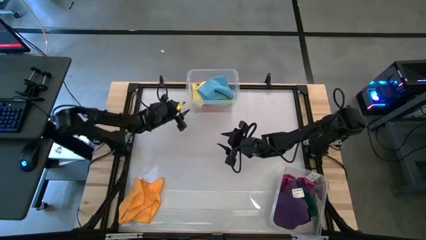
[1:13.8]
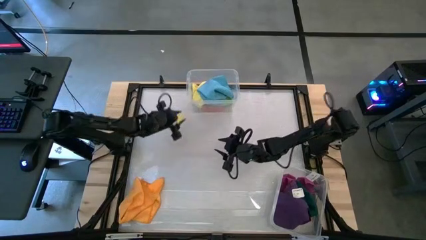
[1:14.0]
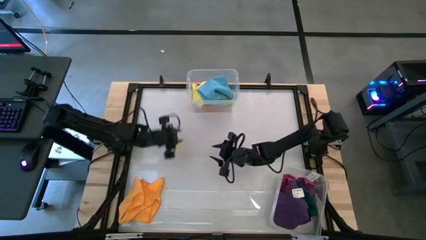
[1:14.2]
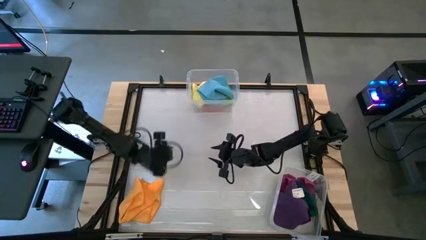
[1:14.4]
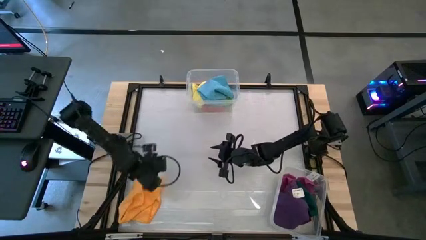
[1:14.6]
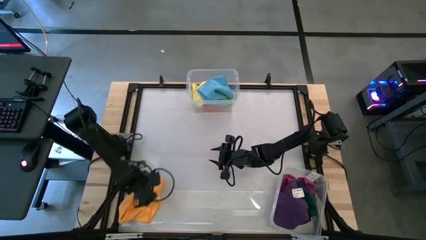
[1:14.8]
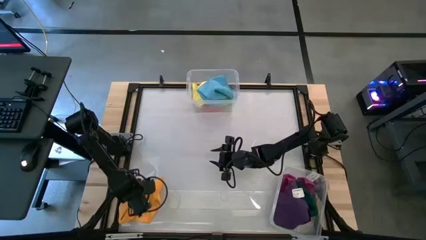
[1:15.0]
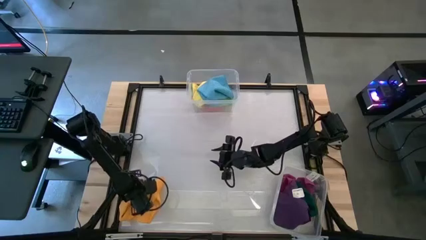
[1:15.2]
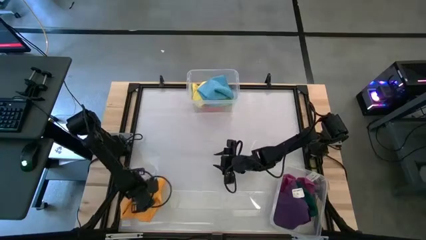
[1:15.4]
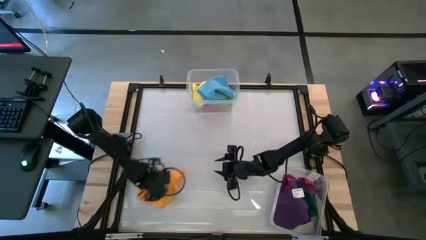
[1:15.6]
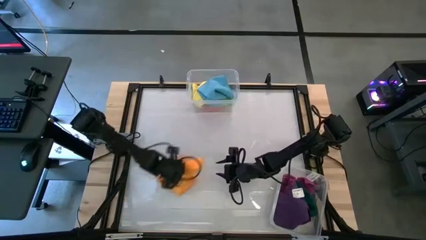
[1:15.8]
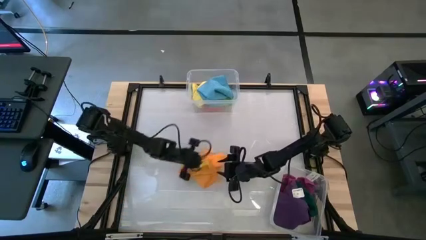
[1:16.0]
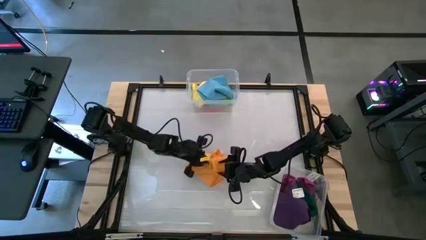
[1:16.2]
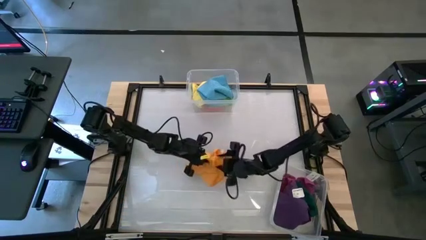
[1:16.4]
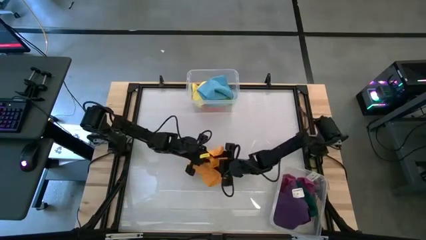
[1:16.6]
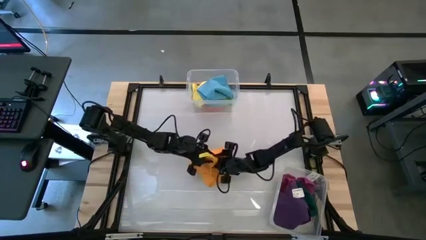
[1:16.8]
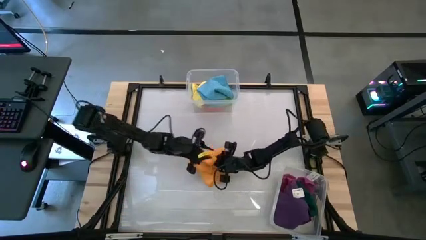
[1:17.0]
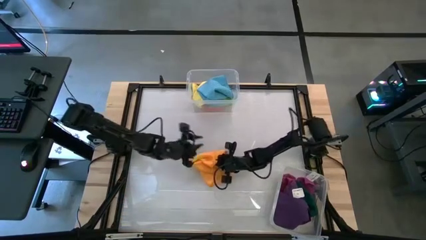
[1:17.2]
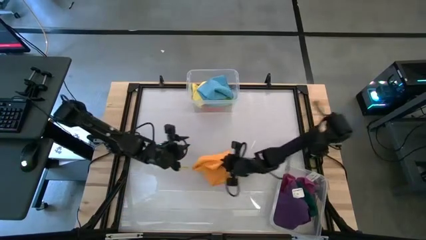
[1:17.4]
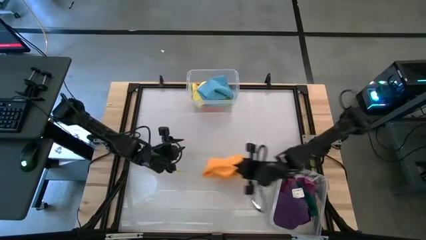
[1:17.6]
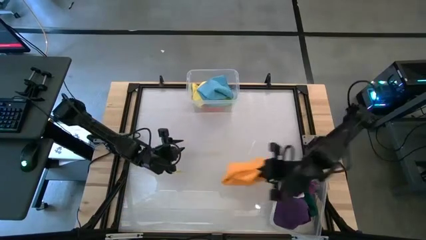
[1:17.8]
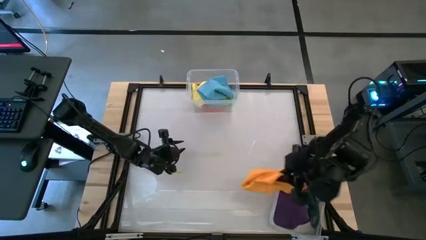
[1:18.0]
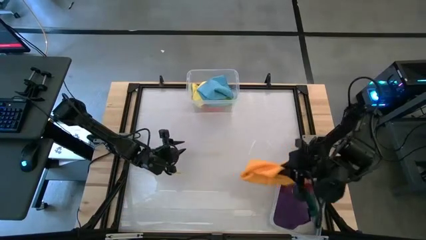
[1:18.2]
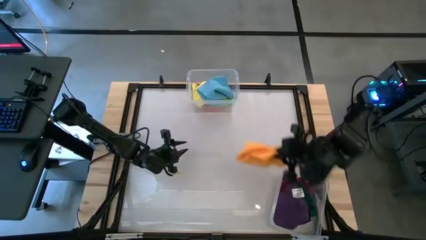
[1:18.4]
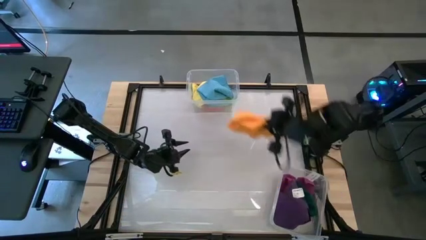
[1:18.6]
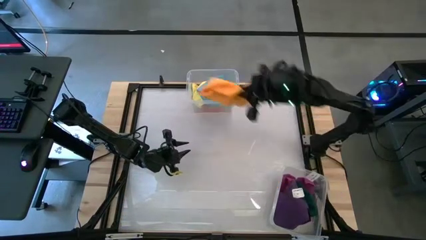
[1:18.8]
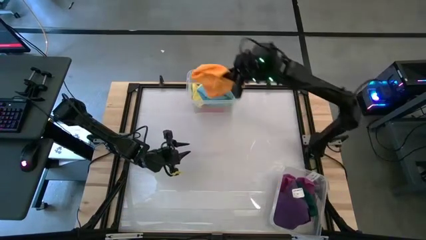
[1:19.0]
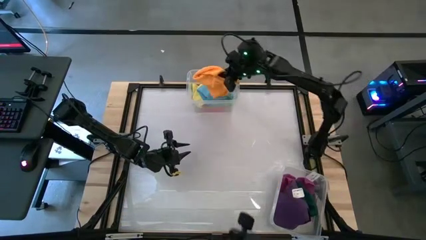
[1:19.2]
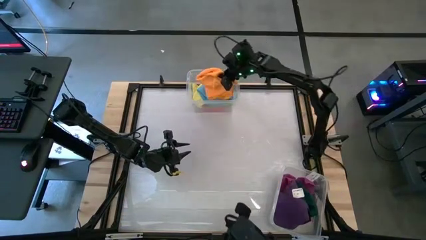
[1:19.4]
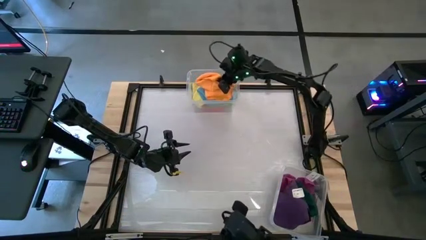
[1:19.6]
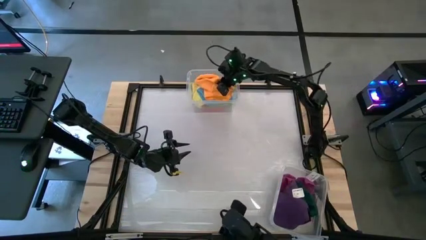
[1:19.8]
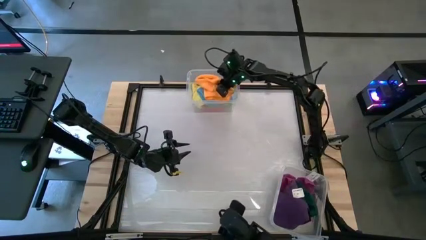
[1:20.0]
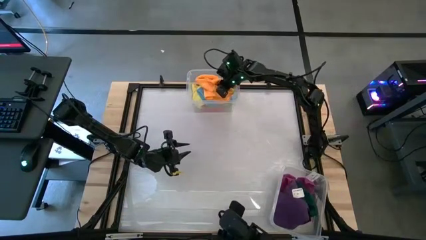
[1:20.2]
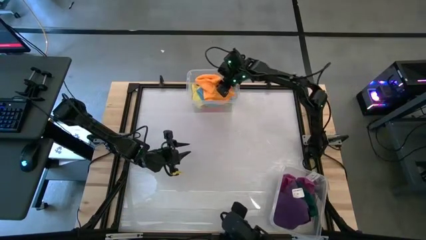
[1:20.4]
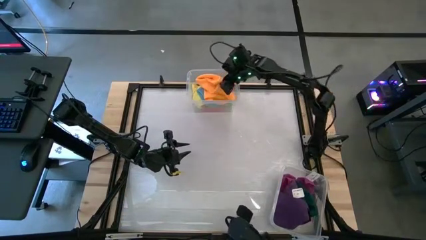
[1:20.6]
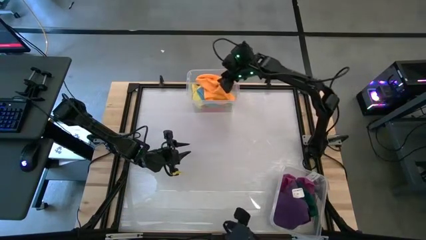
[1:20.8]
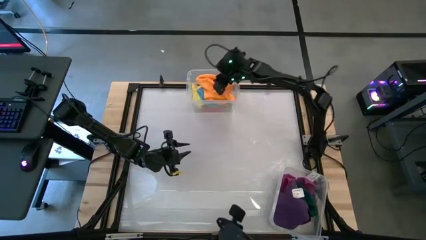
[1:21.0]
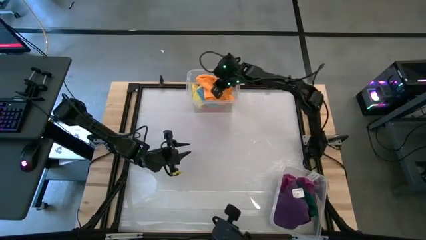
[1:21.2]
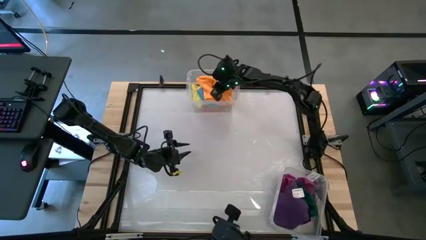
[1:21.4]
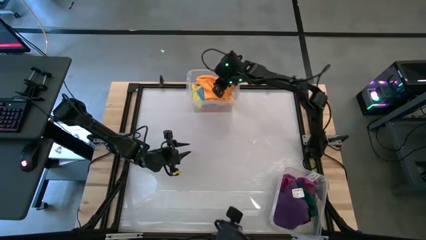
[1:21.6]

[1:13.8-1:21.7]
Task: Sort towels by color in basket
Put the orange microfiber cloth into the bin

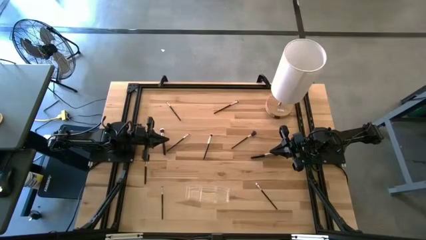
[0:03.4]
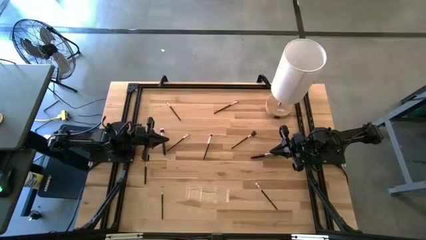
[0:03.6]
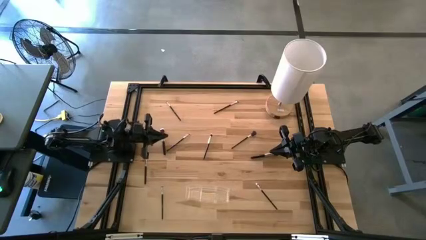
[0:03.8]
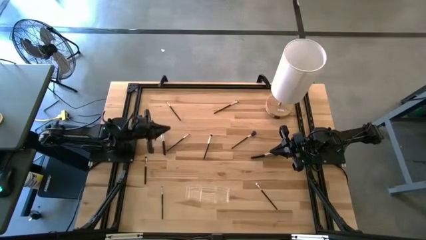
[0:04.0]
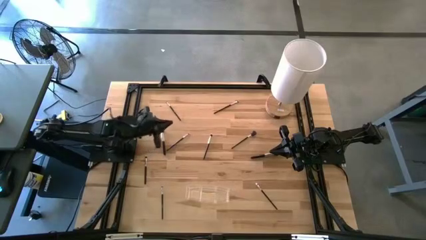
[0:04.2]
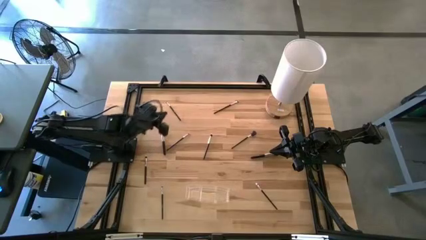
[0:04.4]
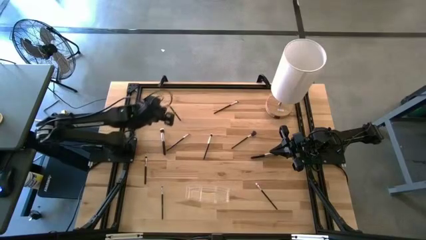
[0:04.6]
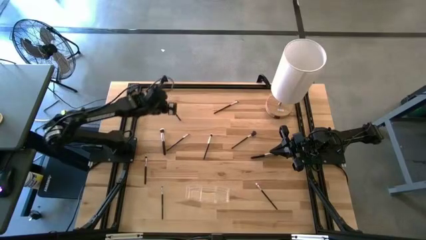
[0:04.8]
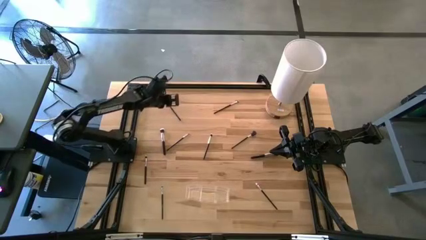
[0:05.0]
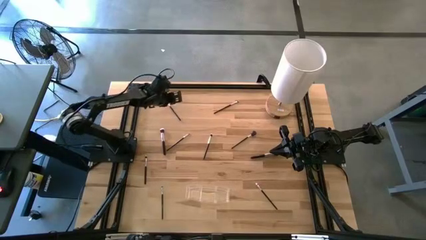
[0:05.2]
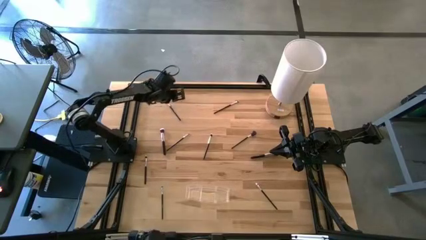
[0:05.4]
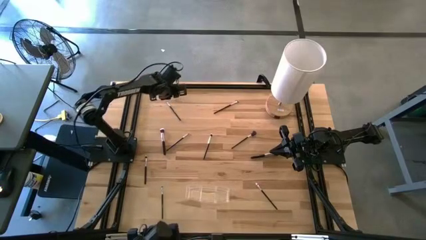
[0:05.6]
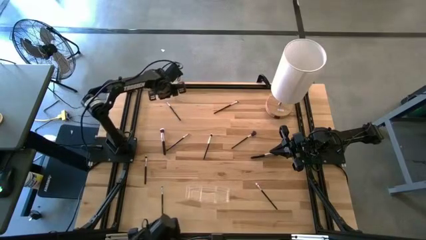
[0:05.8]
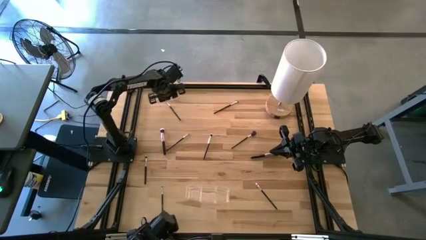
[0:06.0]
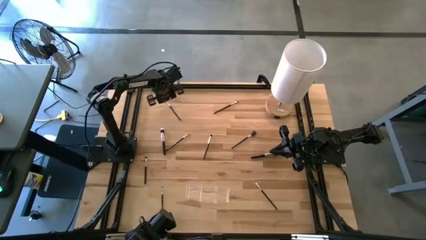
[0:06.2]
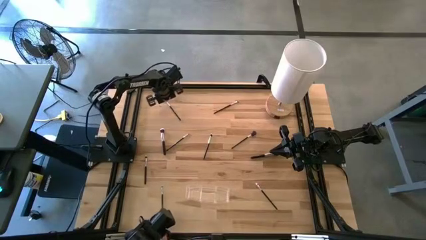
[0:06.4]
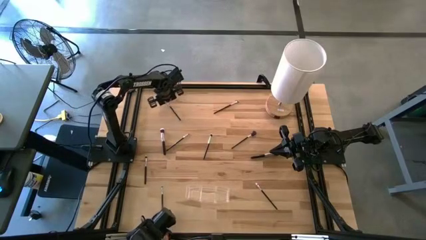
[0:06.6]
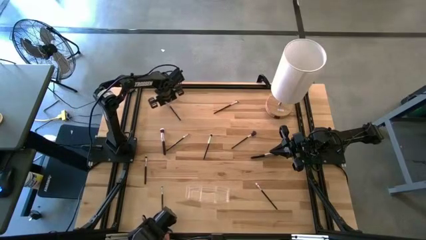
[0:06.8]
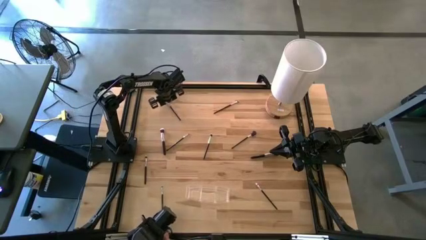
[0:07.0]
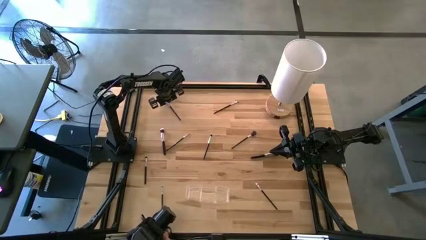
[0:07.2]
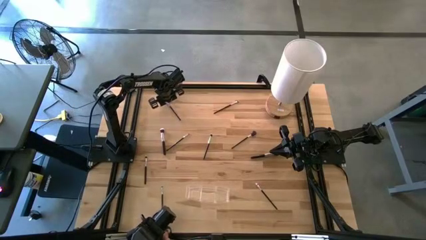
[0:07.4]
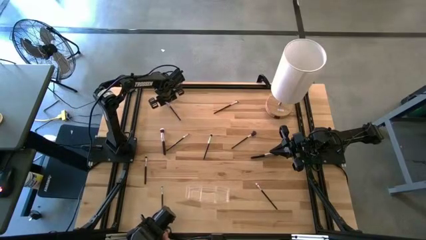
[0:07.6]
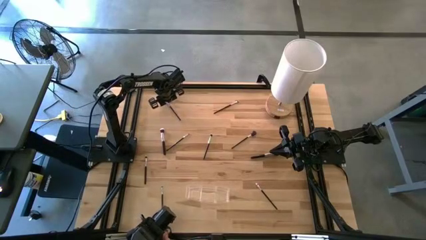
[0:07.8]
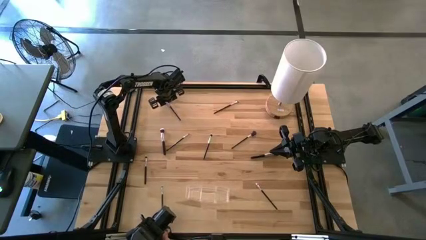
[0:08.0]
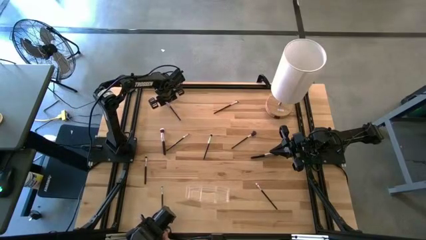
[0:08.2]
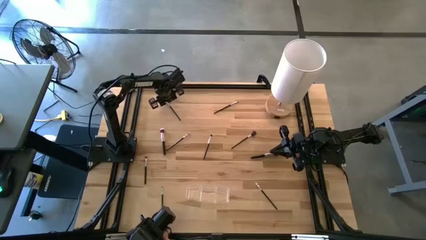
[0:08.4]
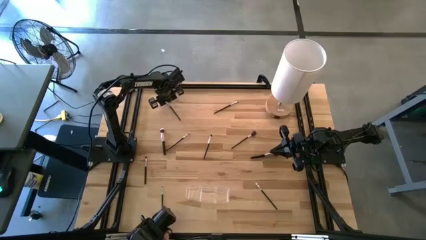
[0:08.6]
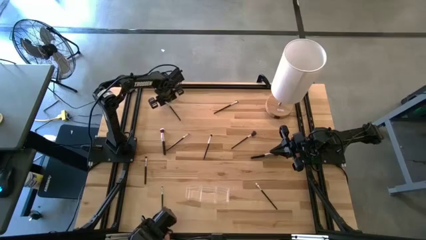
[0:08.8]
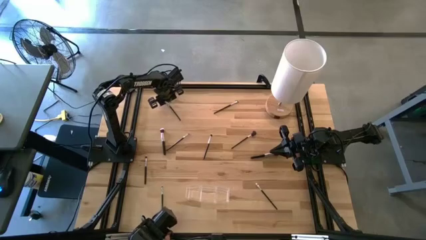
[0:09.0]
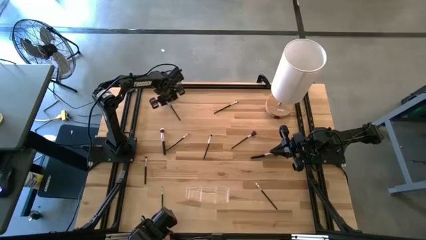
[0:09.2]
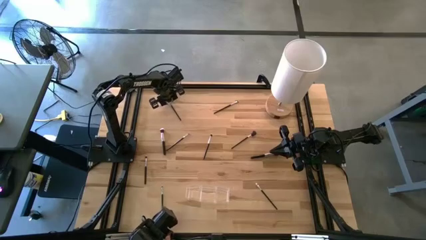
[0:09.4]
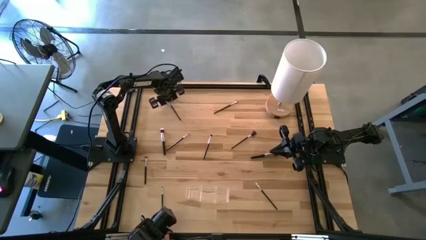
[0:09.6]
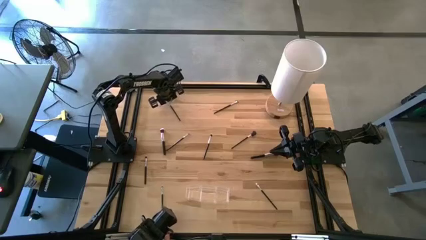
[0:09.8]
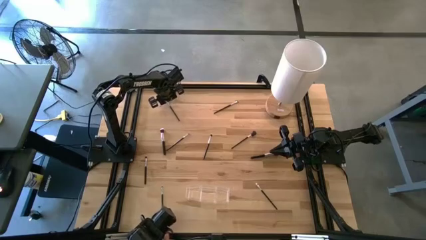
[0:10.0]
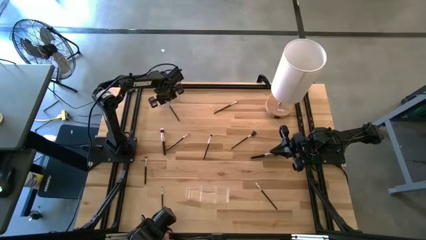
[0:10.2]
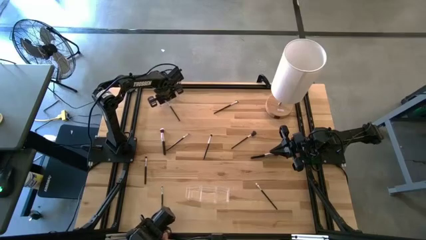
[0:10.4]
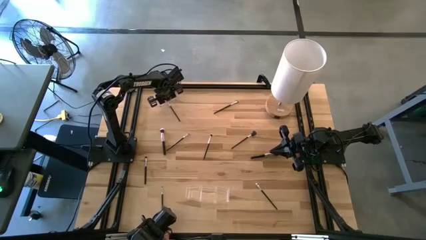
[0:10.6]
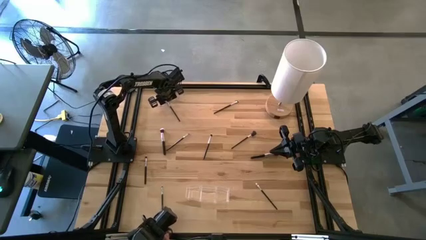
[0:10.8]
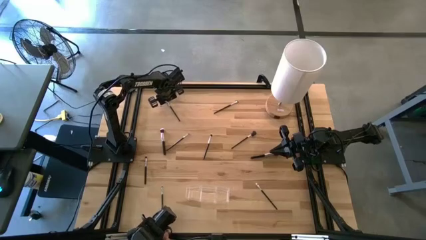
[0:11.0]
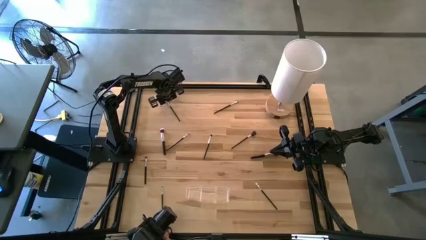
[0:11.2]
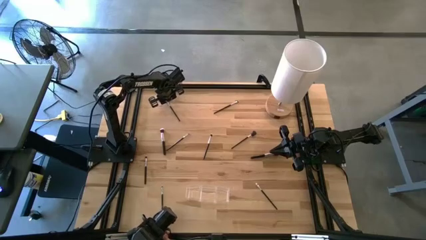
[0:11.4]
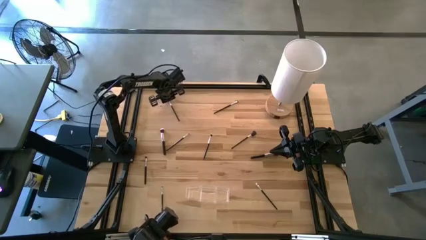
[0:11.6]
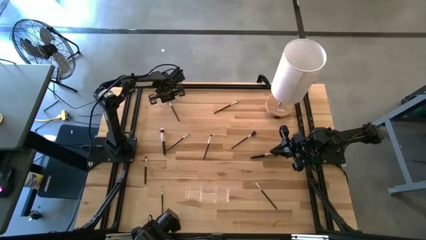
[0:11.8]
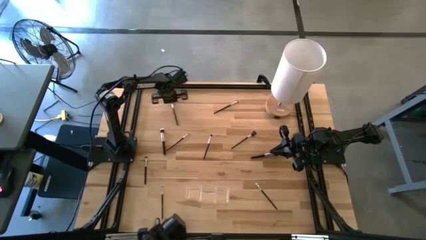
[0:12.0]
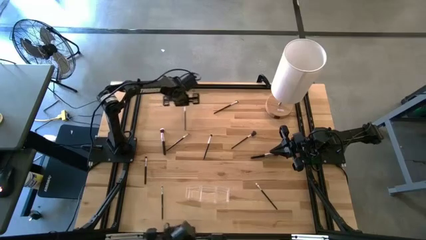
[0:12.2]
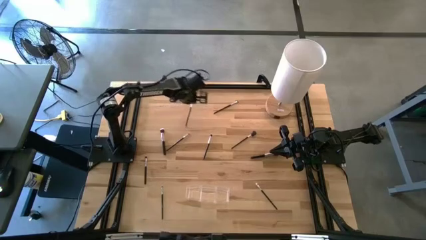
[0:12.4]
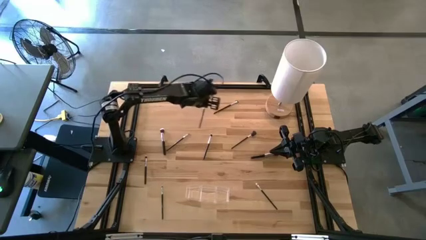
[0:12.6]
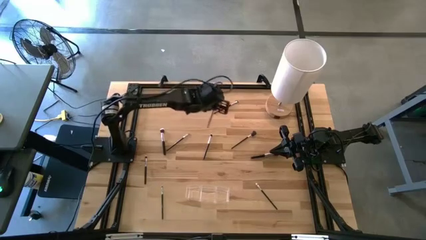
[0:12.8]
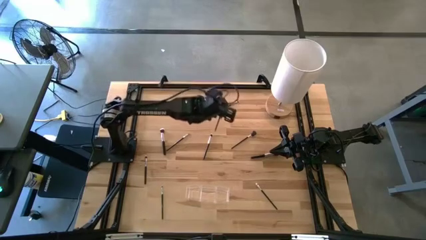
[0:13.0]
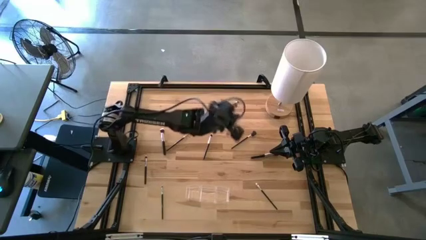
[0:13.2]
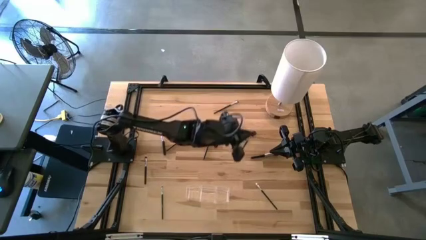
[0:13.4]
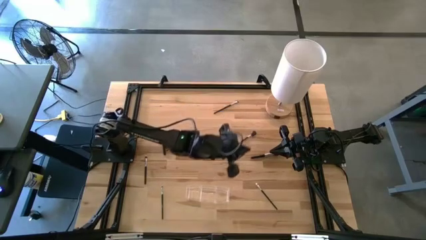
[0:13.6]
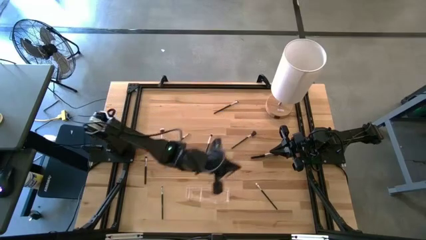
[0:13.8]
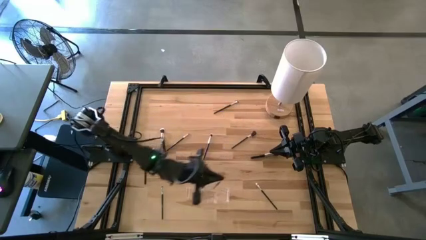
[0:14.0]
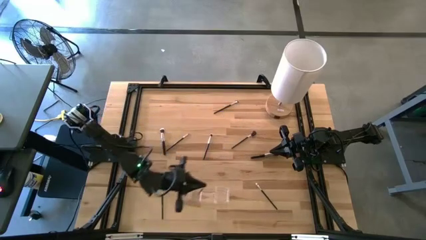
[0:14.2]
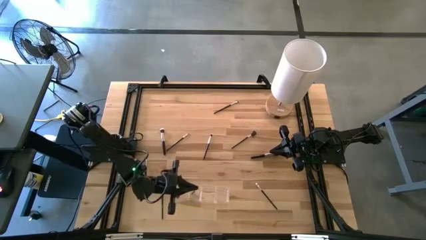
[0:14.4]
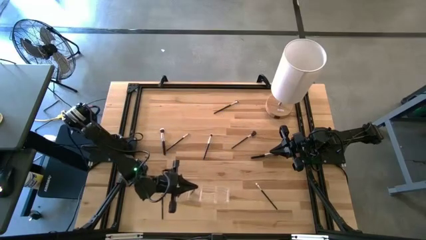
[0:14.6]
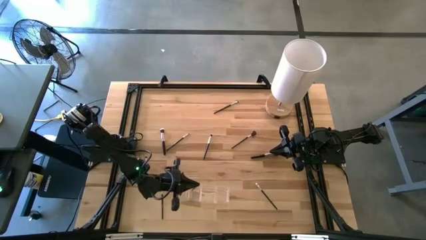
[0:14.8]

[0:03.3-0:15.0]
Task: Put items in baskets/containers
Put the black eyeshadow brush into the transparent organizer
